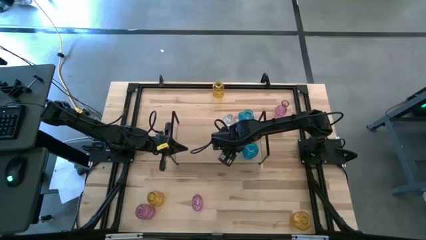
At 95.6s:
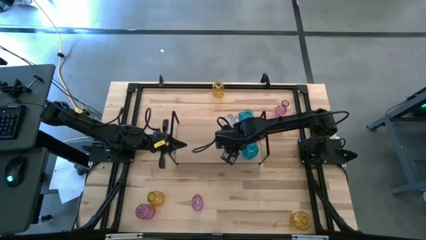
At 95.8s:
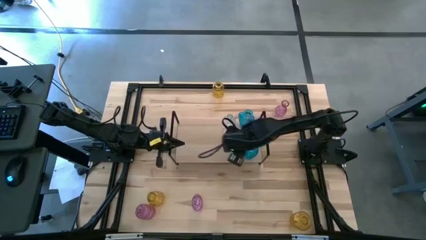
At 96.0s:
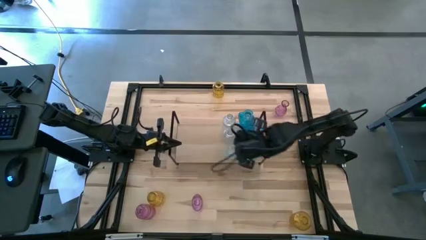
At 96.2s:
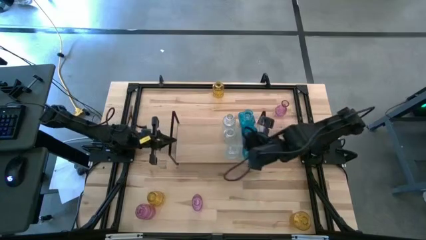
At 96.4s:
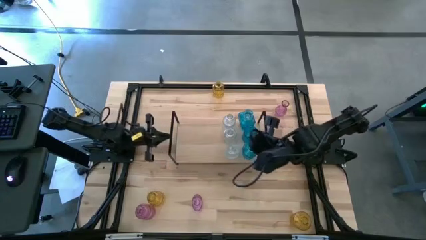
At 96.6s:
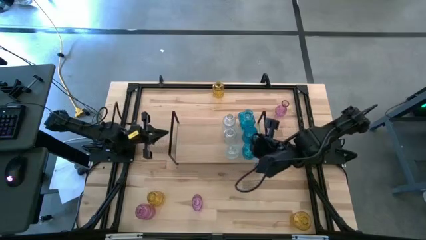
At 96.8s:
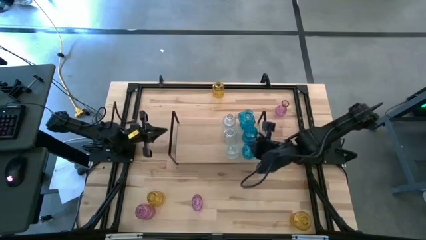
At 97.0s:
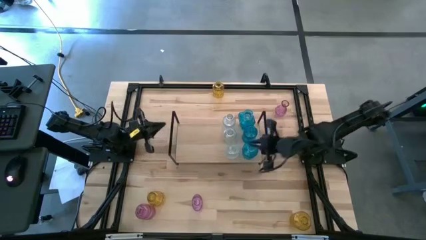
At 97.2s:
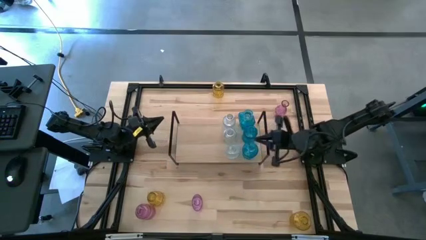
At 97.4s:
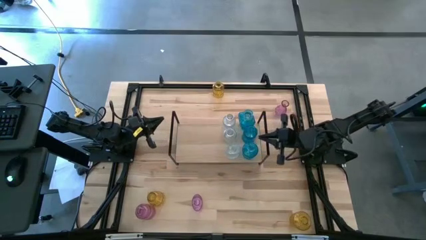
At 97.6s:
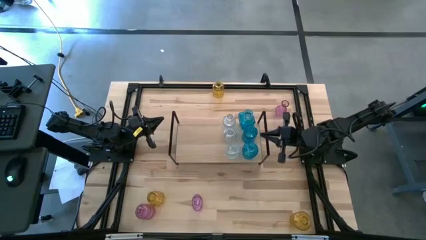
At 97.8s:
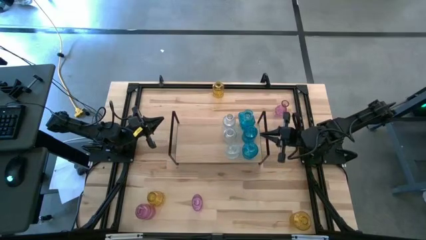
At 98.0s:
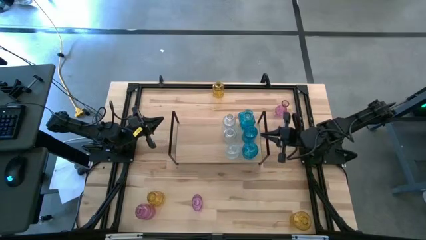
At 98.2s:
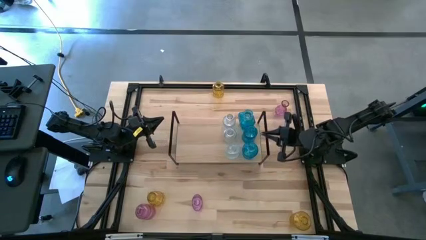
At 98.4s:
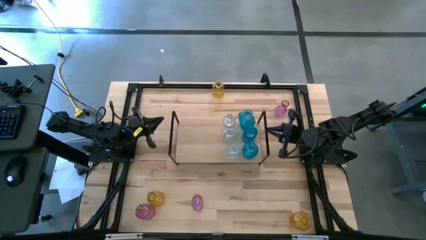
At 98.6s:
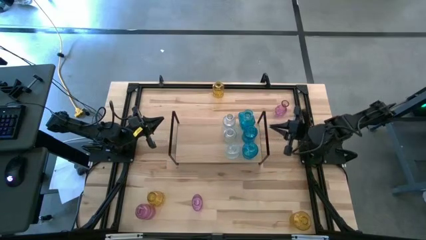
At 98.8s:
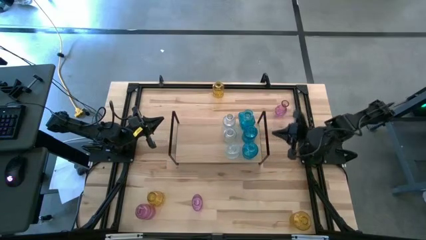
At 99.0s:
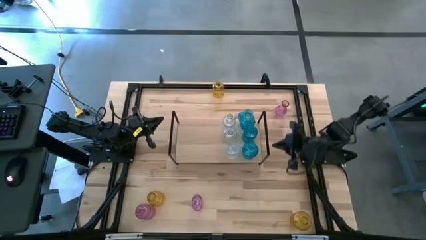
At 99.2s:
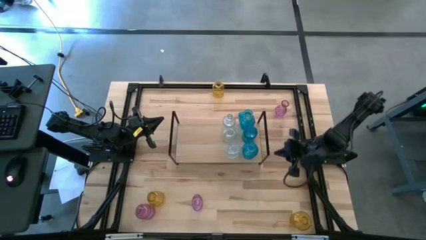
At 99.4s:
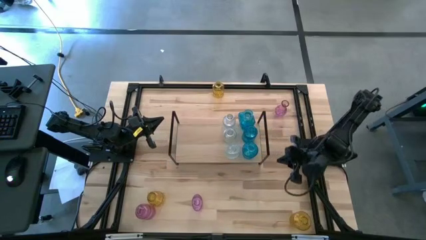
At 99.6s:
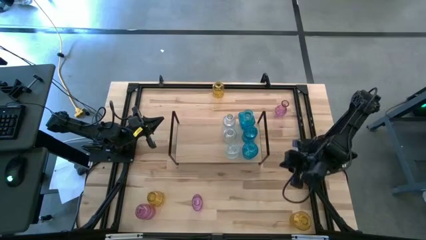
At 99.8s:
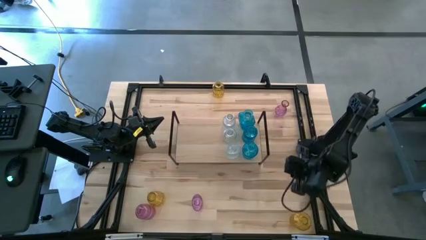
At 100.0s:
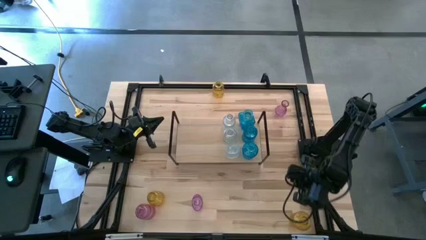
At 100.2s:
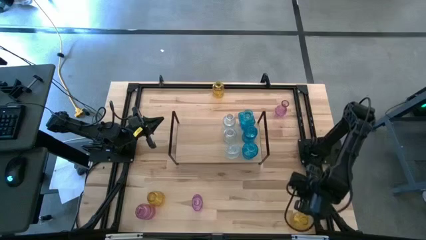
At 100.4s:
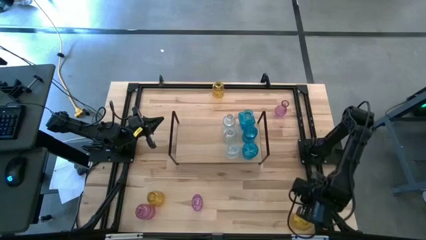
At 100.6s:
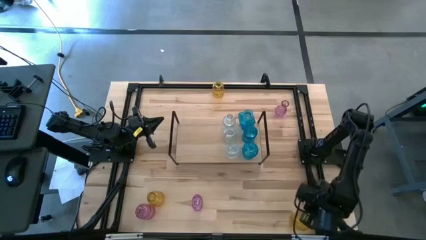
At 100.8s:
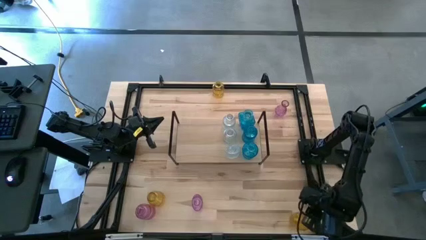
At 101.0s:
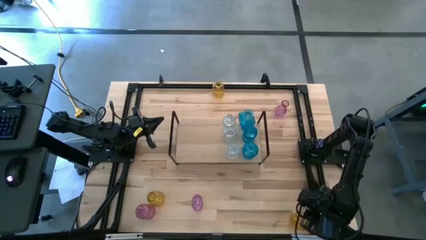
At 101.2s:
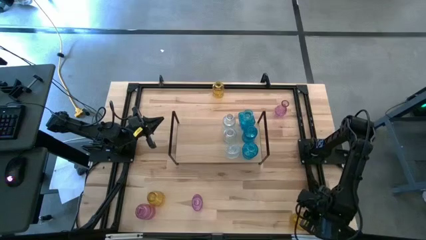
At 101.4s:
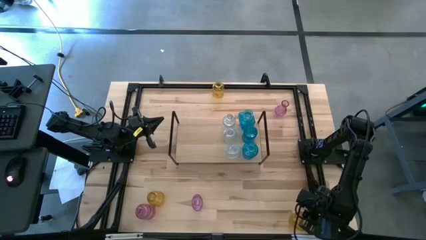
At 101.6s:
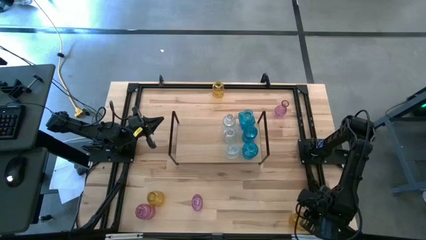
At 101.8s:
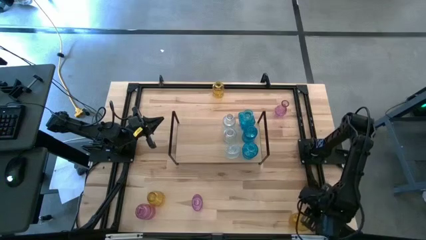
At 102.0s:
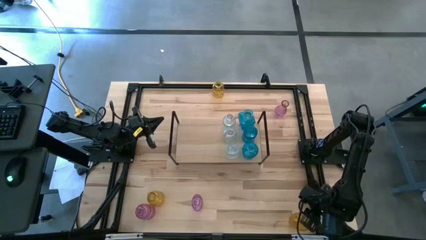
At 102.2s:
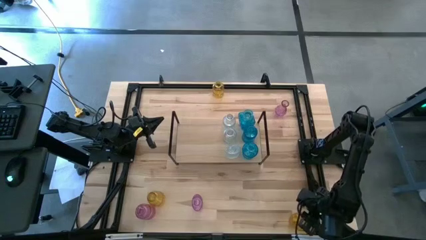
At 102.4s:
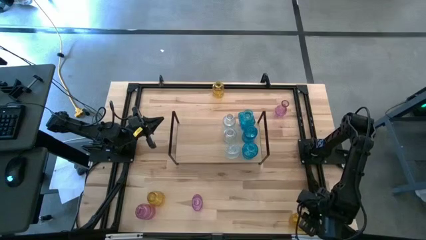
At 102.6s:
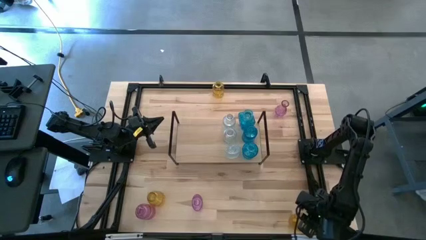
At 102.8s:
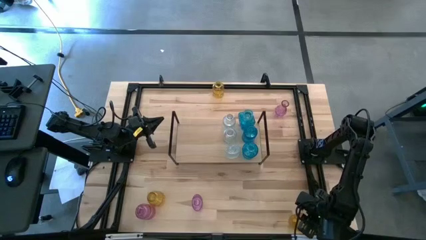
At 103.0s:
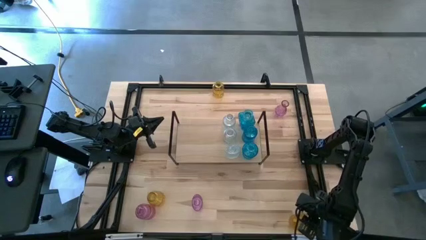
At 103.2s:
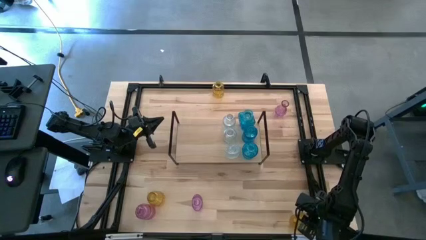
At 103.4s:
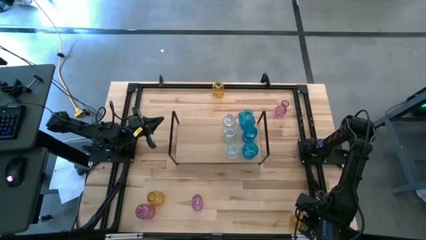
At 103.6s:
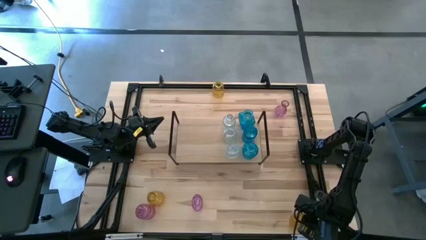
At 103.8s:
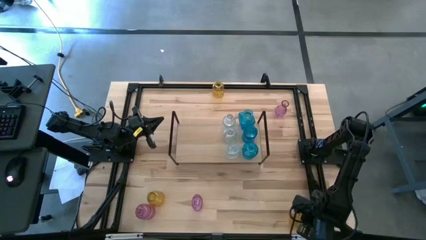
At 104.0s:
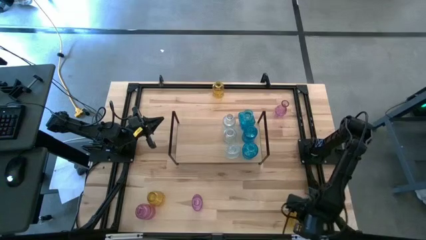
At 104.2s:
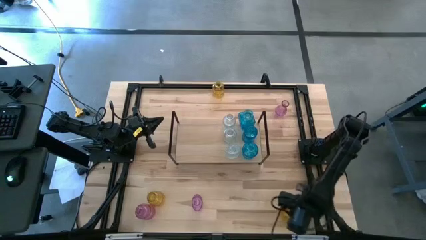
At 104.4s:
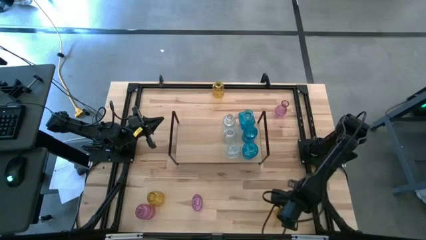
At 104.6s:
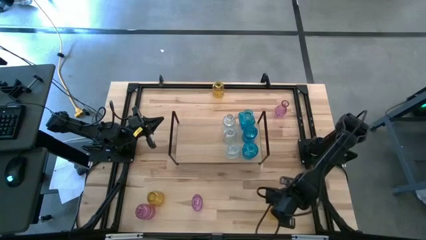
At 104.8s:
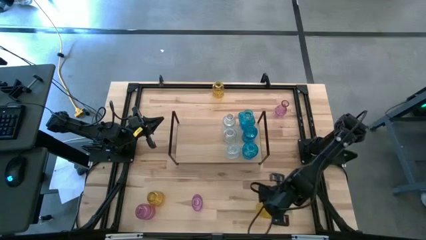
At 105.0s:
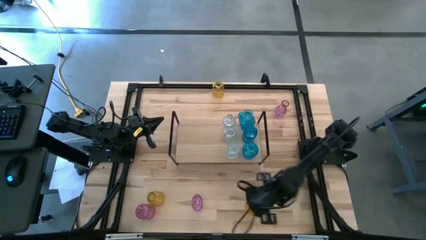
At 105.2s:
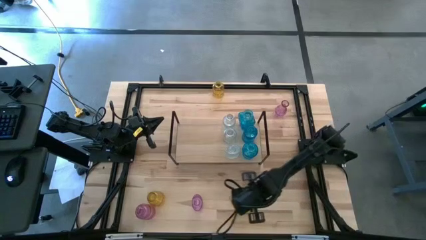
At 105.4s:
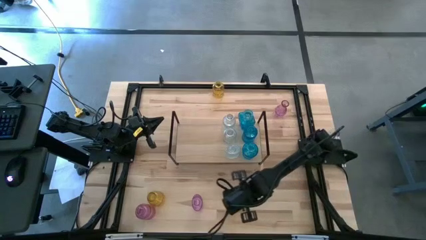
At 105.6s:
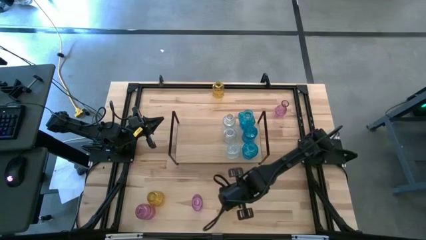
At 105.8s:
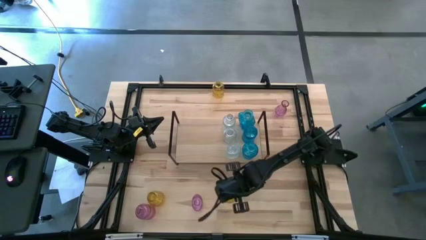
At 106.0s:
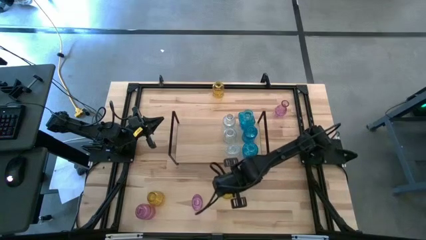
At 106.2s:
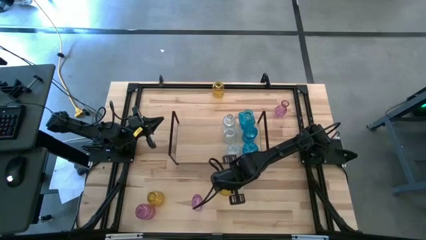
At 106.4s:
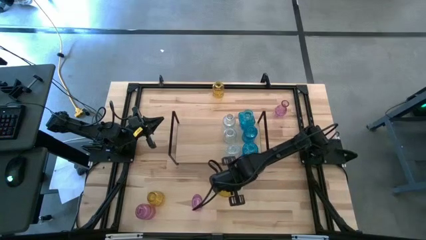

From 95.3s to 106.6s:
Task: sort vases onto shelf
Put the bottom right yellow vase on the shelf
